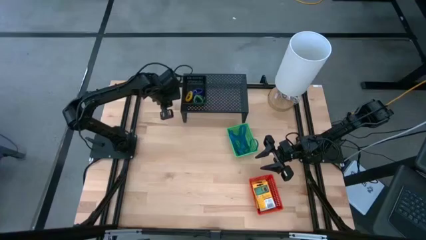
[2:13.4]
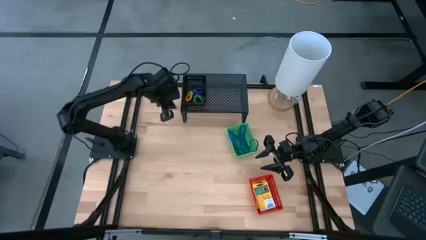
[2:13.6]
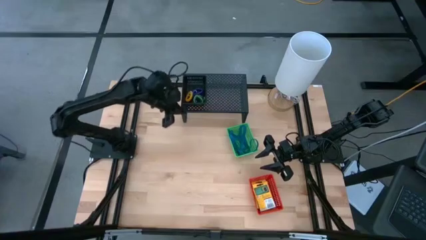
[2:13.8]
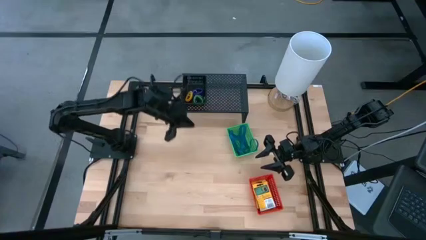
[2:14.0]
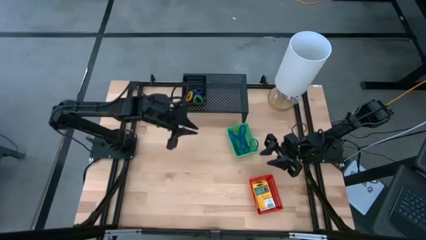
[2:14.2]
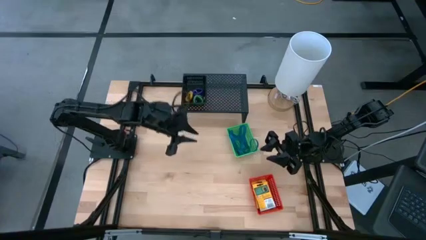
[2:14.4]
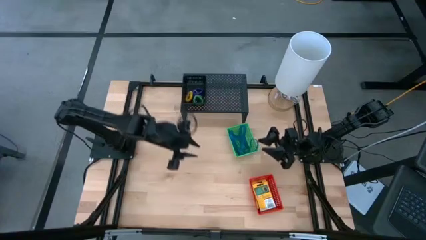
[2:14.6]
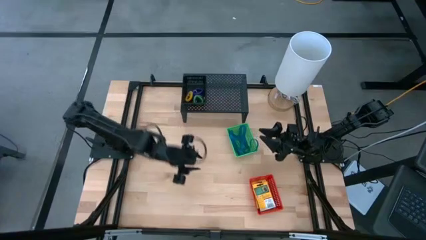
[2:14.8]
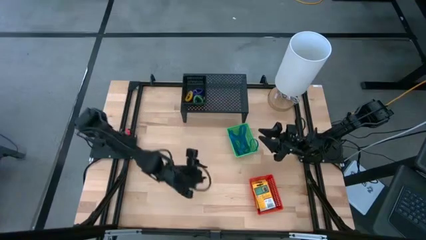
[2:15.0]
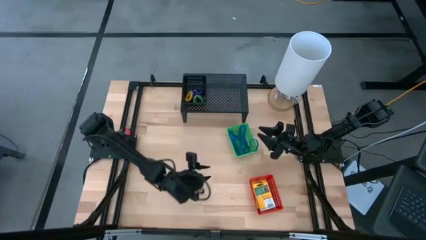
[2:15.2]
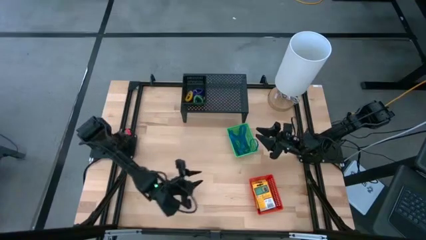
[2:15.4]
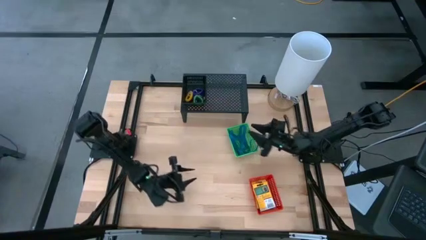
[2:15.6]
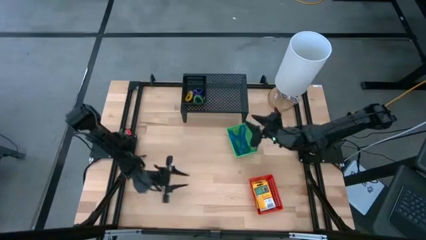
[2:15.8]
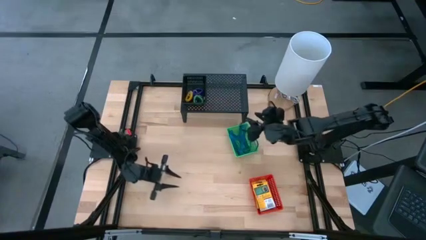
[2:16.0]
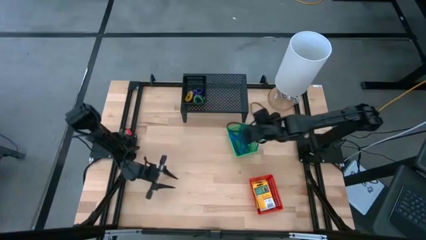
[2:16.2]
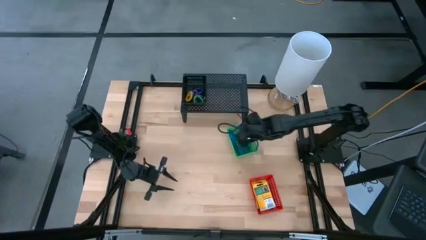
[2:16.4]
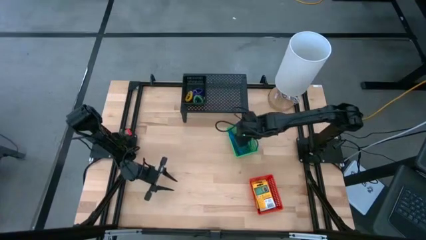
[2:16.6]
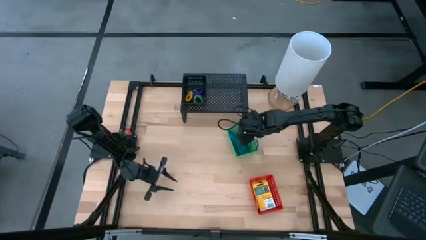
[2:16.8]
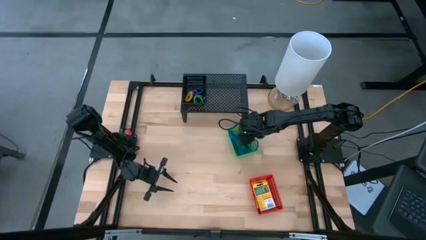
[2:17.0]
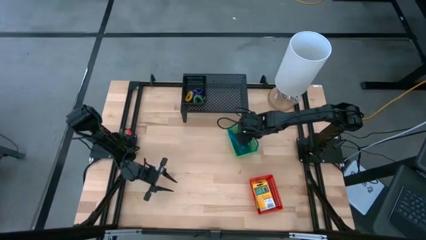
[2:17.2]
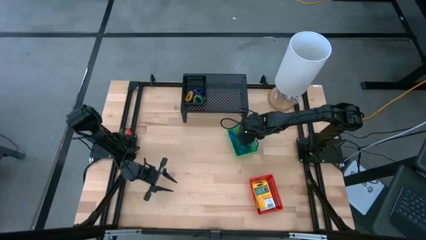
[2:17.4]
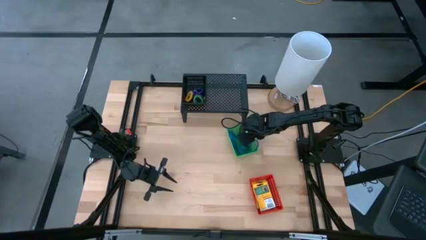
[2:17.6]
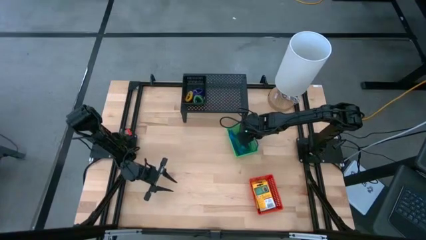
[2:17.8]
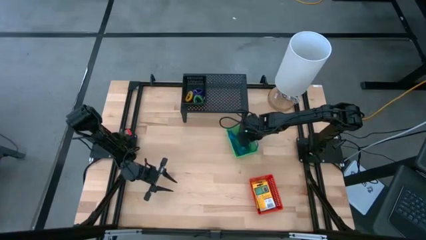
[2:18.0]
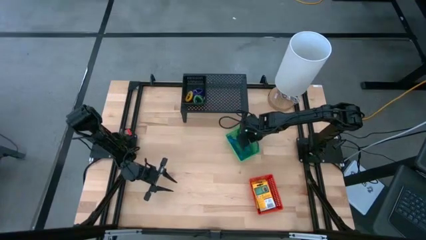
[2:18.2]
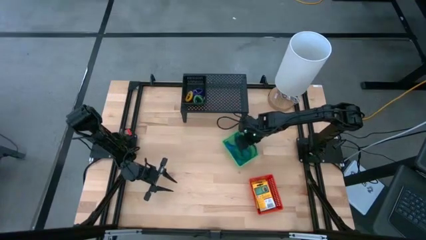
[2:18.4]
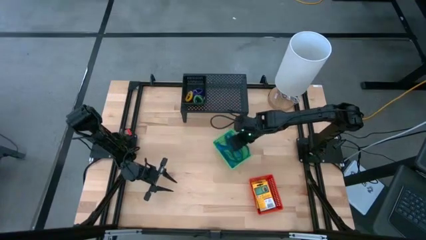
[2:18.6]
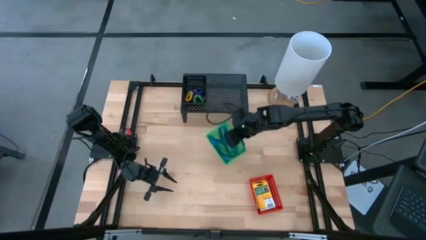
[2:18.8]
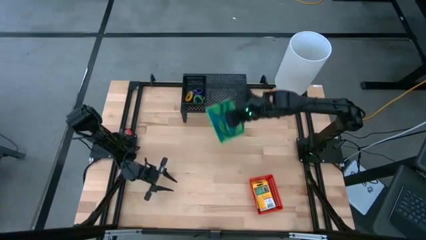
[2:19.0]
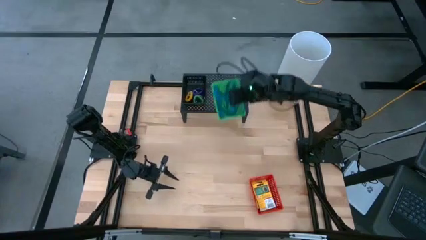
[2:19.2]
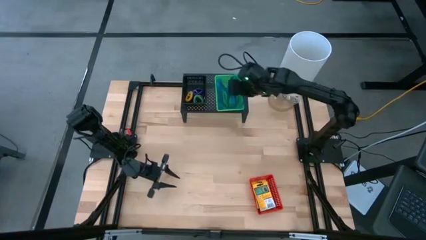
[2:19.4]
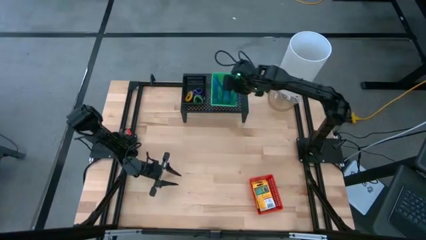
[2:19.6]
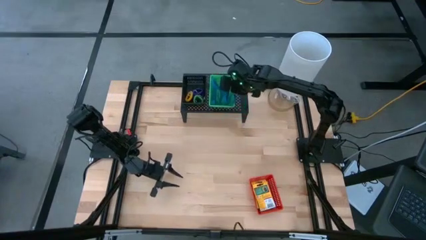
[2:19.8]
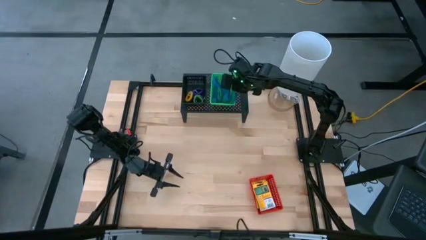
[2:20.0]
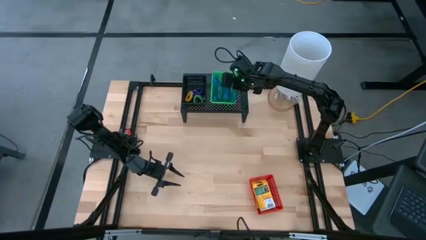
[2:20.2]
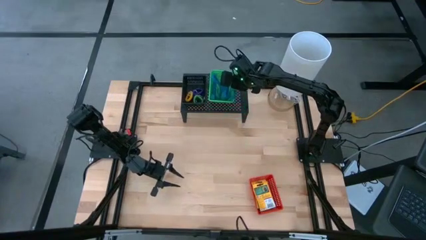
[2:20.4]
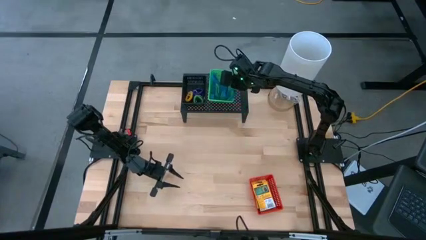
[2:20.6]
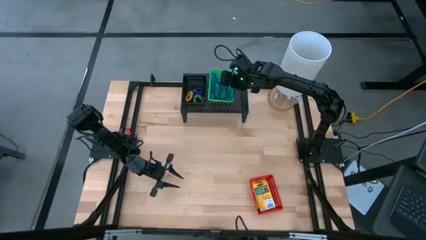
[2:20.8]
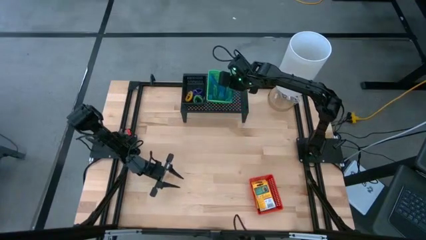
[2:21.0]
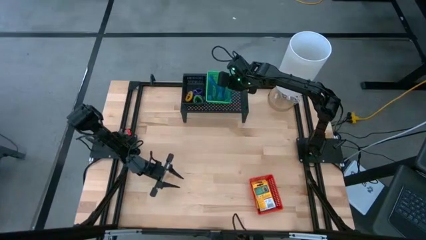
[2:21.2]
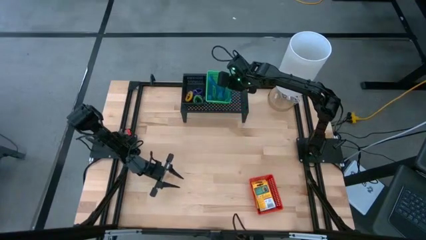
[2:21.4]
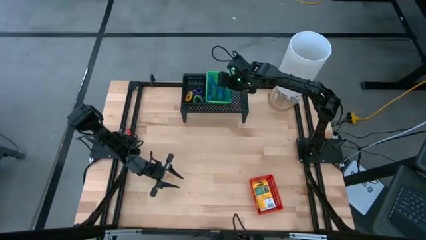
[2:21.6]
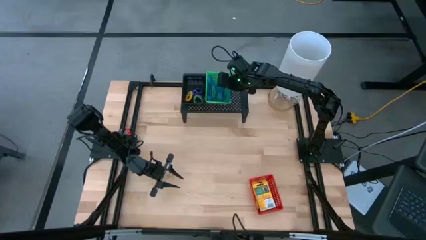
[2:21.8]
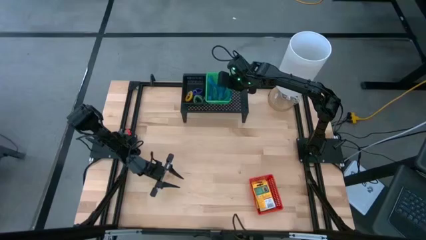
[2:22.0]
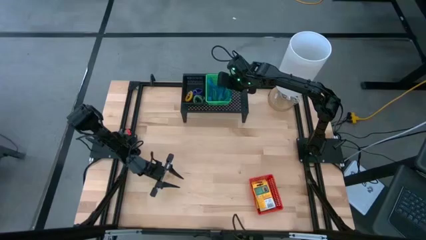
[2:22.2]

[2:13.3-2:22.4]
Task: Pick & Place Office Desk Supplies
Put the green basket on the shelf

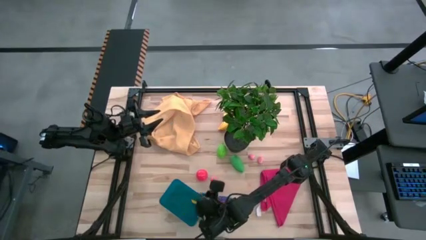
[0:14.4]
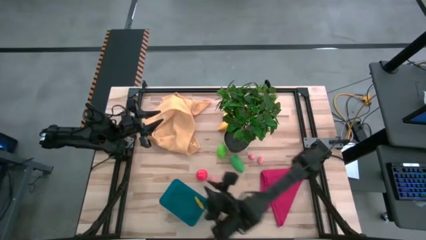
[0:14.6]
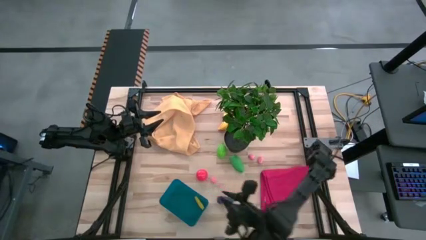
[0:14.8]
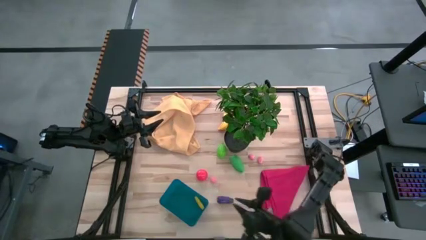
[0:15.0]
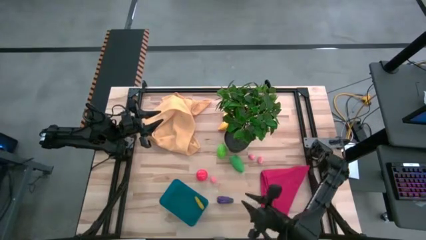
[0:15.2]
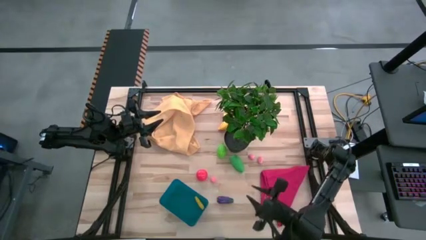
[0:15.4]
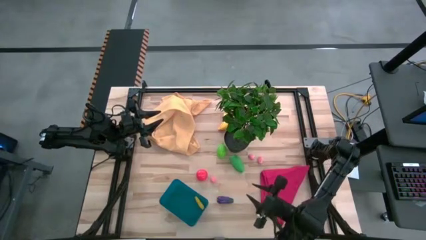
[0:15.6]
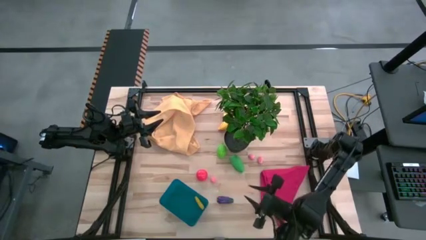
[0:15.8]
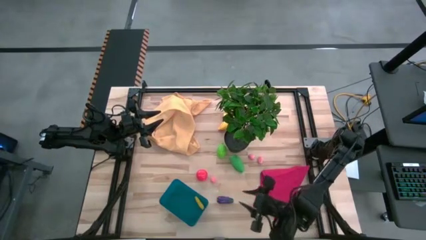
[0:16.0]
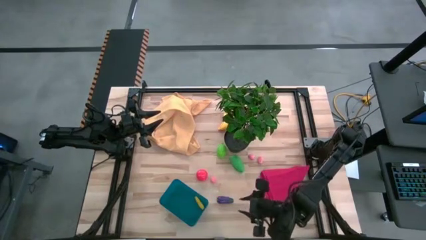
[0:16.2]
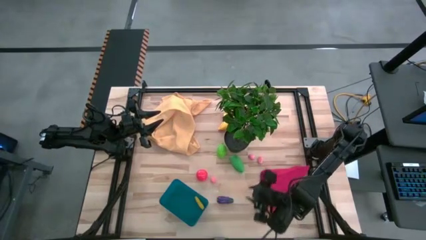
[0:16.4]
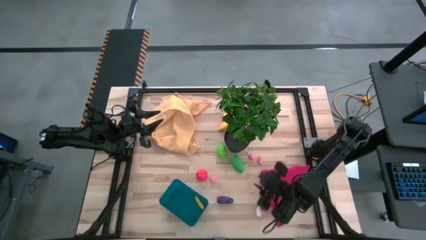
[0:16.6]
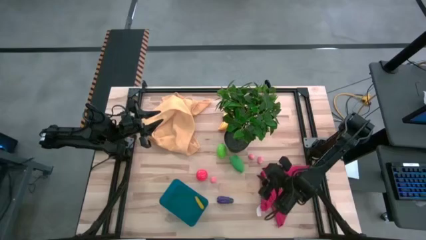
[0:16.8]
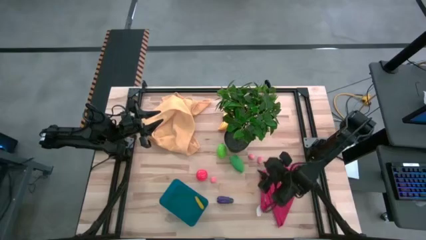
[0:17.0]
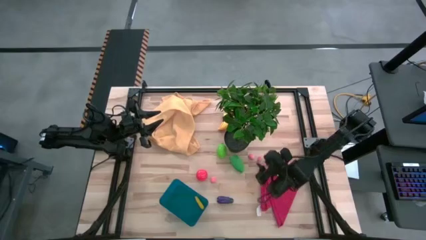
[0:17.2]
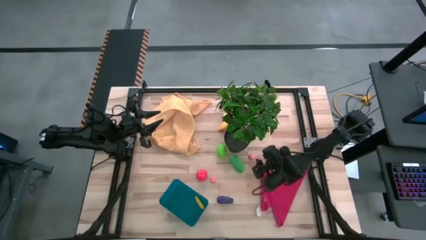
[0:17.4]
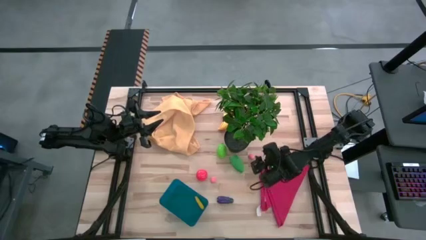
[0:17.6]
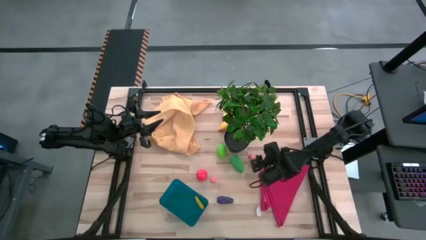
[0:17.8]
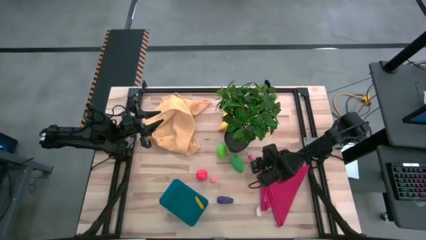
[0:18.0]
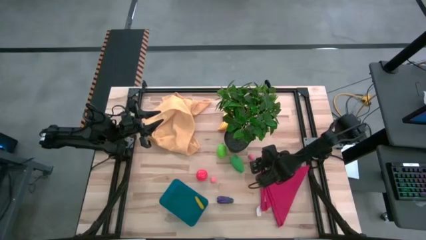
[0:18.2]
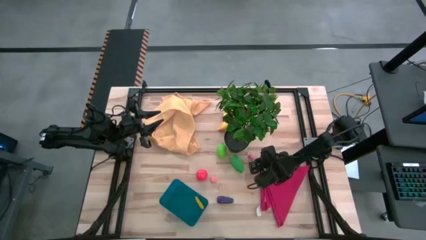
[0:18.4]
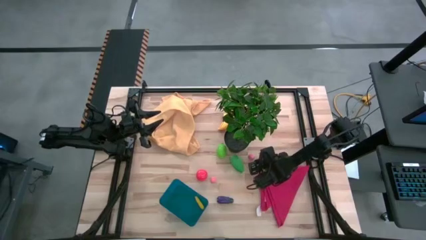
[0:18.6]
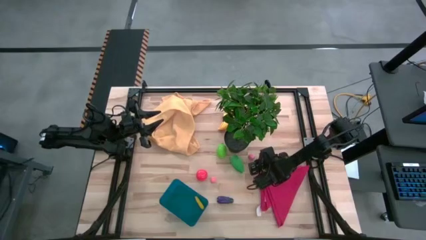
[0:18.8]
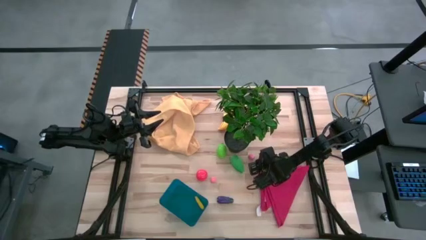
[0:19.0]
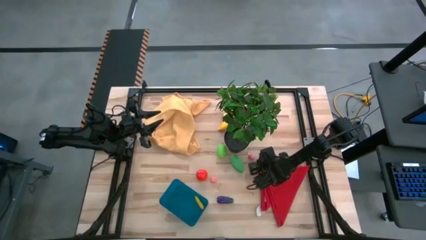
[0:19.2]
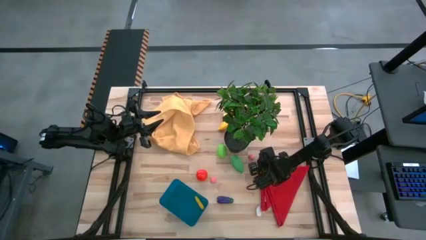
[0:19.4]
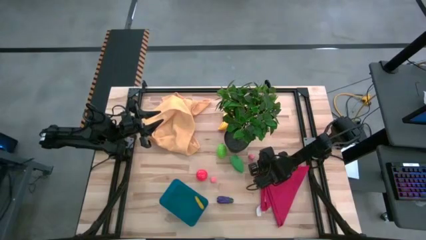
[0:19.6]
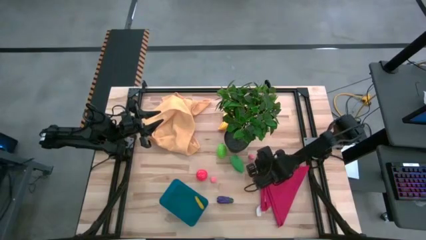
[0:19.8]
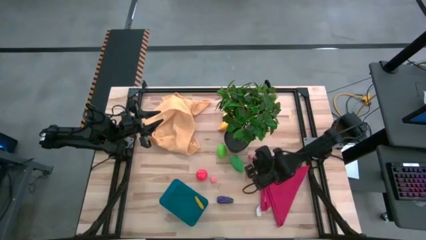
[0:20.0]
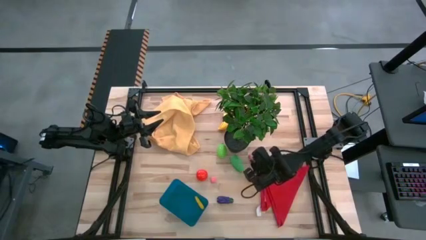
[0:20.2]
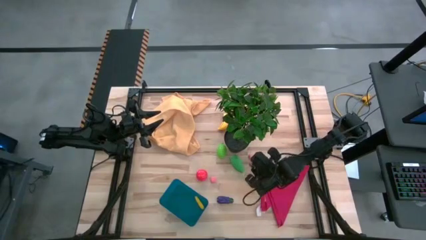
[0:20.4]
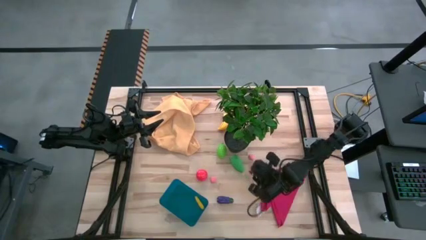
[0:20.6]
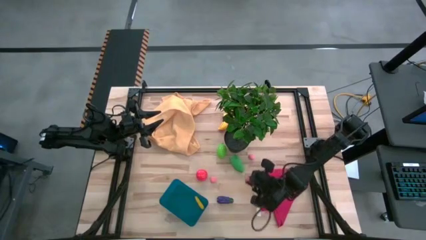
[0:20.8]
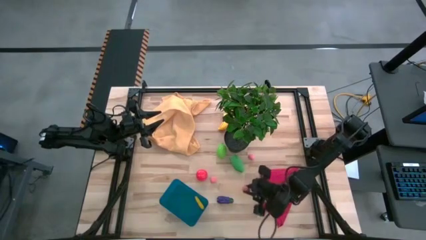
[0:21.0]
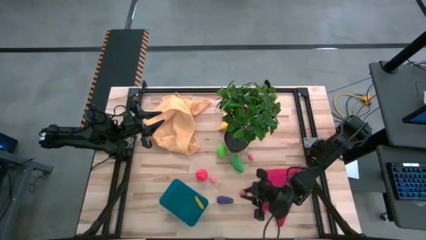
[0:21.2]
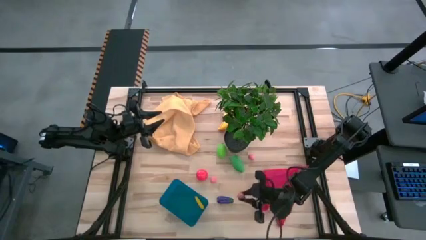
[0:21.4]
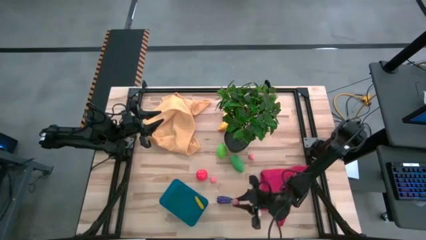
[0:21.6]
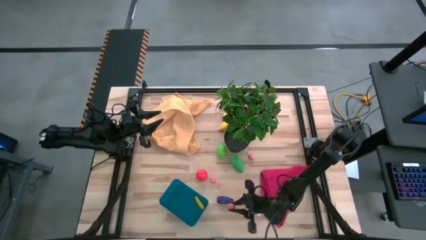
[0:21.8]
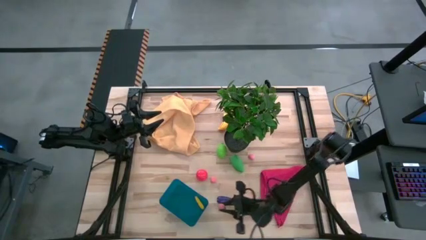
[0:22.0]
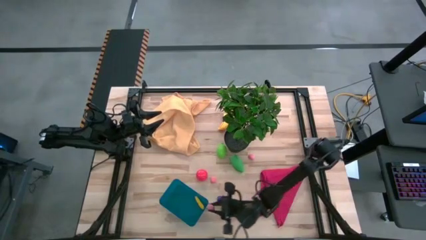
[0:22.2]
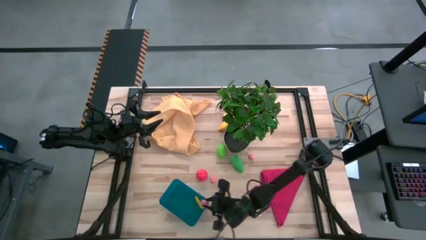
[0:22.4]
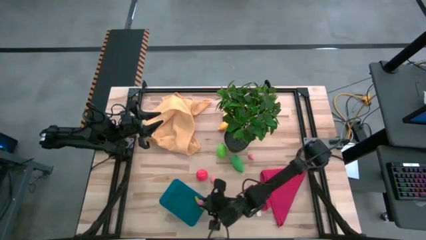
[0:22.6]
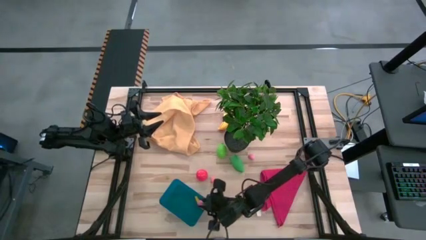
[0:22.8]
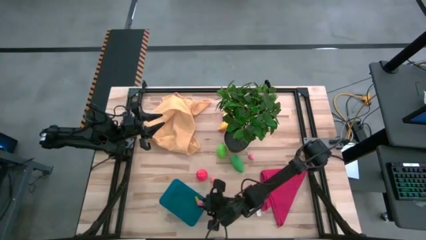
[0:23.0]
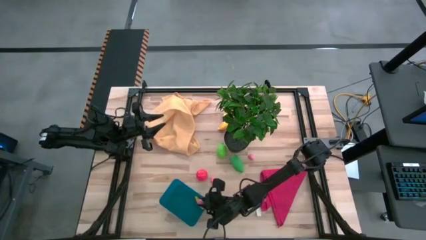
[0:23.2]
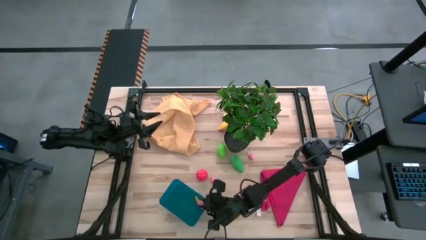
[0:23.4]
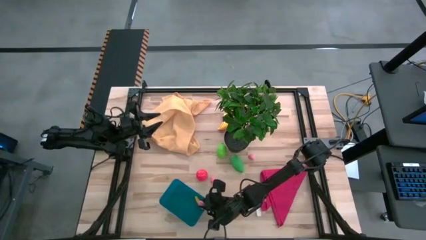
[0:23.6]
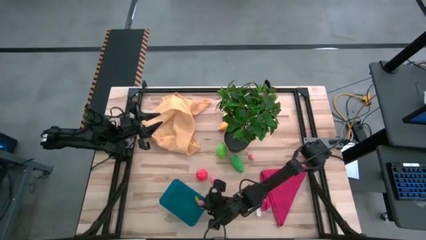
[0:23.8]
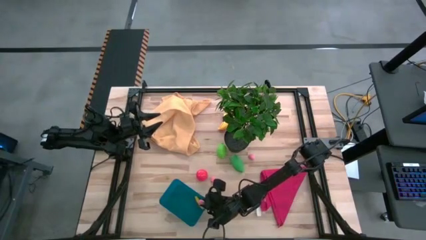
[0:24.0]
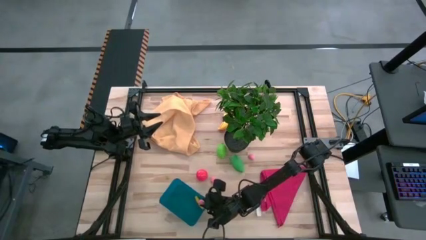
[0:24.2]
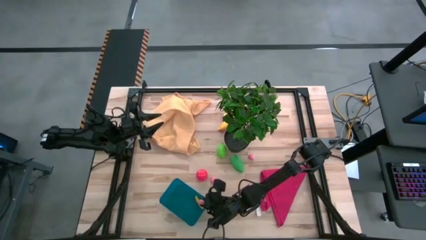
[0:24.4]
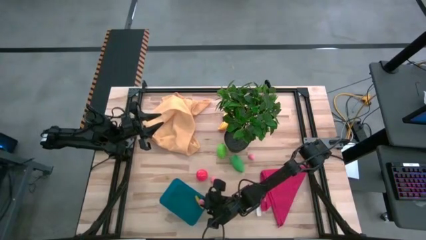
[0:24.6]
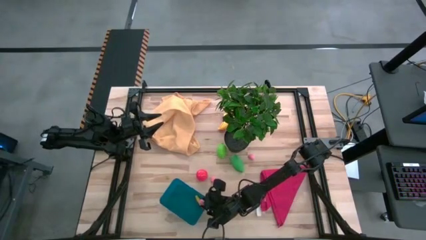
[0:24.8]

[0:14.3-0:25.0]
Task: Pick and placing Produce into tupperware
Put the top right pink peach into the blue bin
